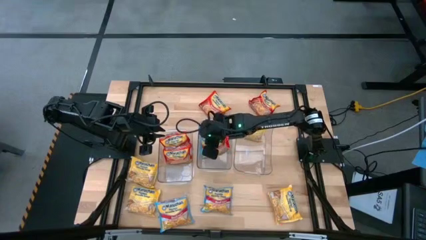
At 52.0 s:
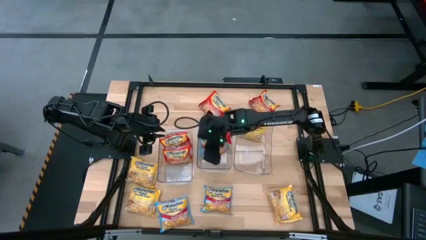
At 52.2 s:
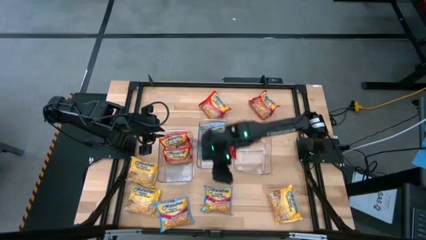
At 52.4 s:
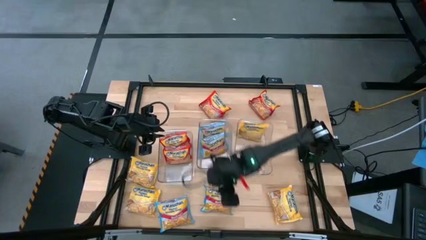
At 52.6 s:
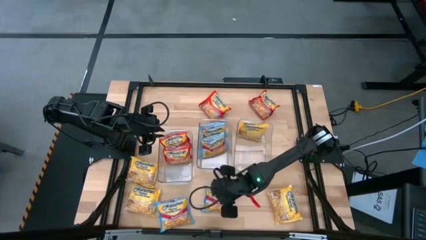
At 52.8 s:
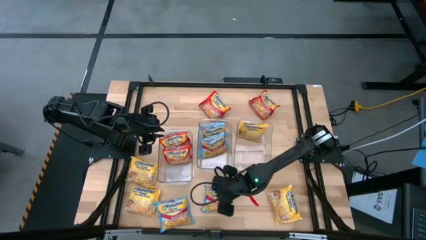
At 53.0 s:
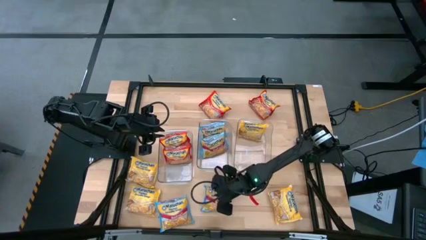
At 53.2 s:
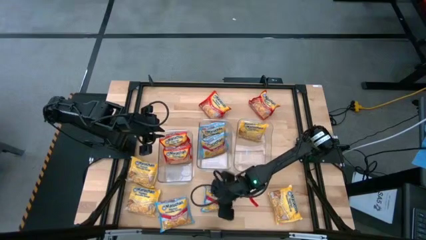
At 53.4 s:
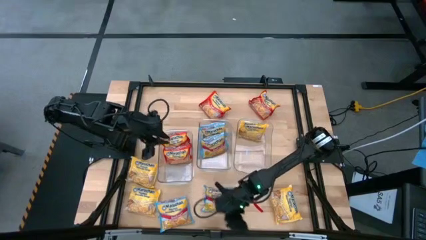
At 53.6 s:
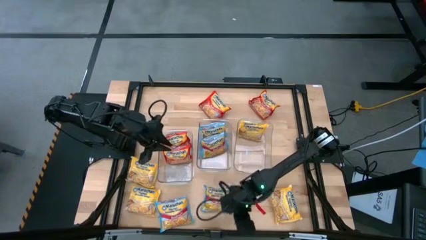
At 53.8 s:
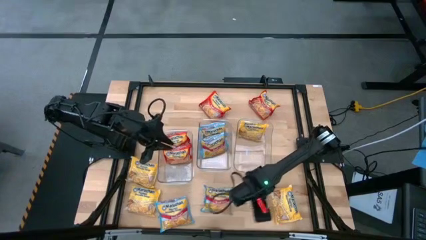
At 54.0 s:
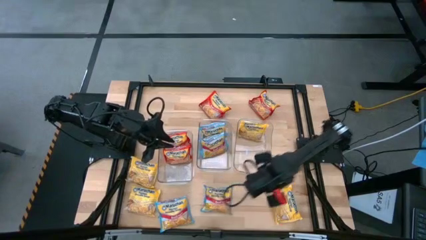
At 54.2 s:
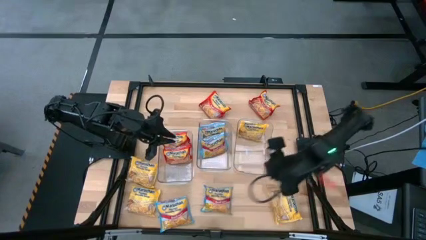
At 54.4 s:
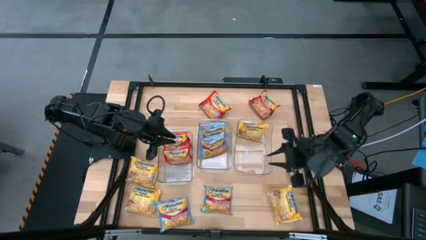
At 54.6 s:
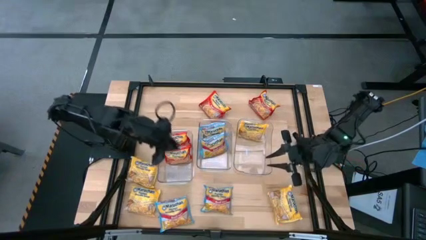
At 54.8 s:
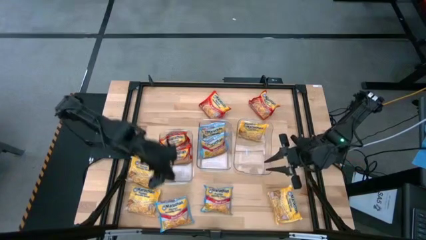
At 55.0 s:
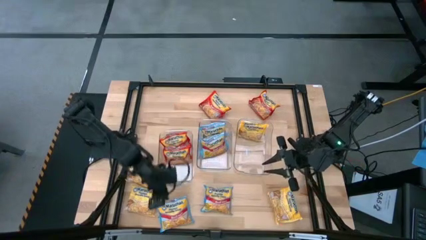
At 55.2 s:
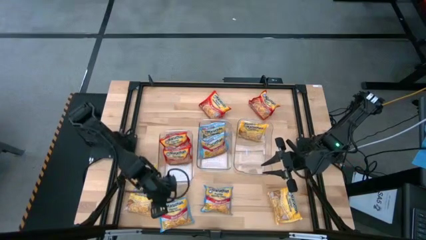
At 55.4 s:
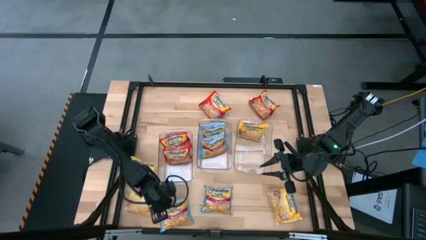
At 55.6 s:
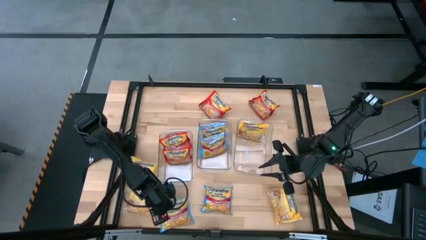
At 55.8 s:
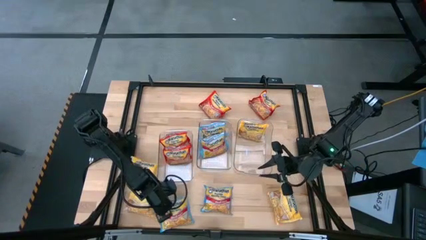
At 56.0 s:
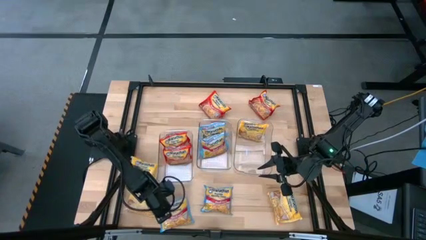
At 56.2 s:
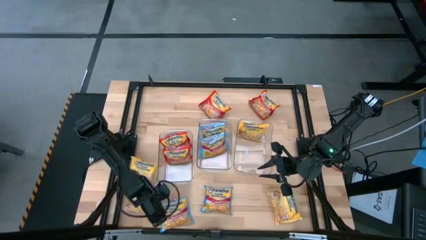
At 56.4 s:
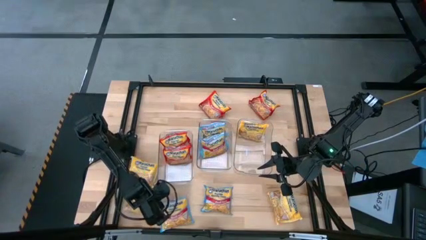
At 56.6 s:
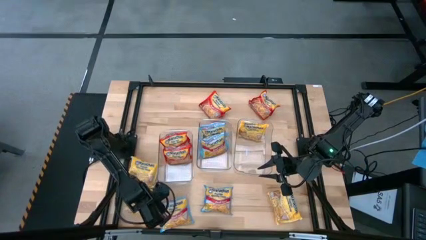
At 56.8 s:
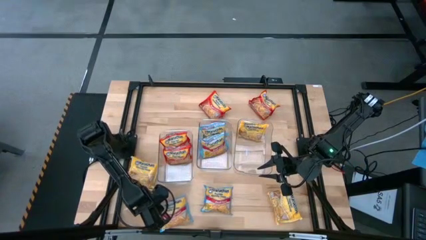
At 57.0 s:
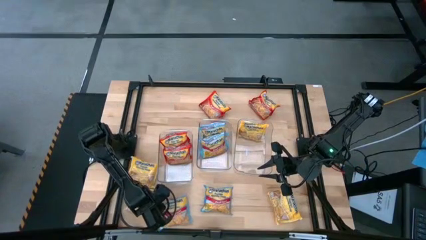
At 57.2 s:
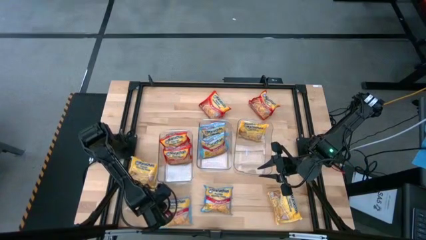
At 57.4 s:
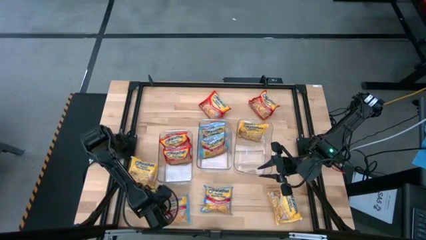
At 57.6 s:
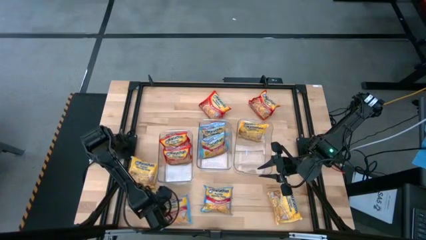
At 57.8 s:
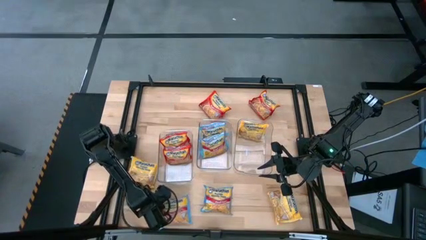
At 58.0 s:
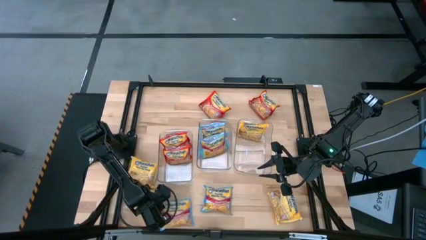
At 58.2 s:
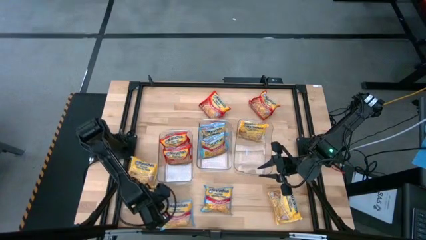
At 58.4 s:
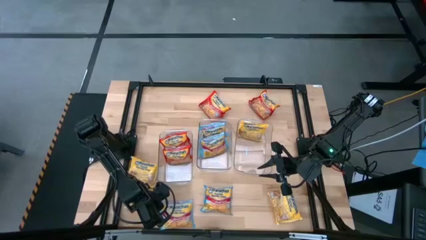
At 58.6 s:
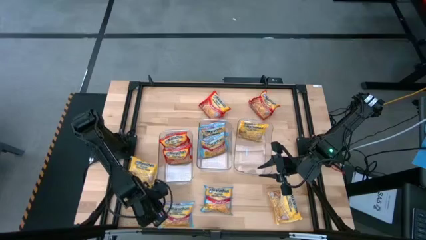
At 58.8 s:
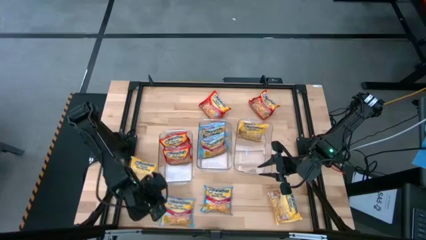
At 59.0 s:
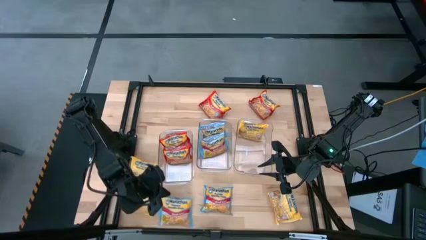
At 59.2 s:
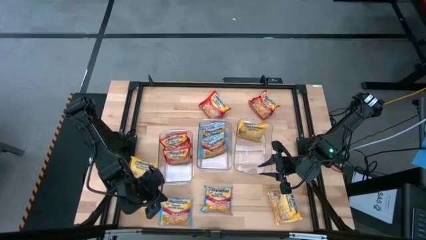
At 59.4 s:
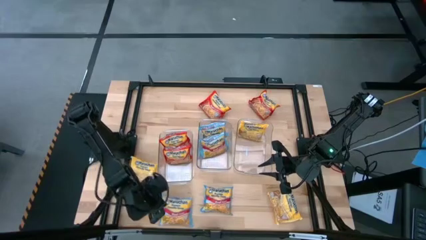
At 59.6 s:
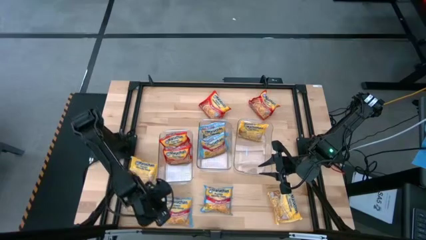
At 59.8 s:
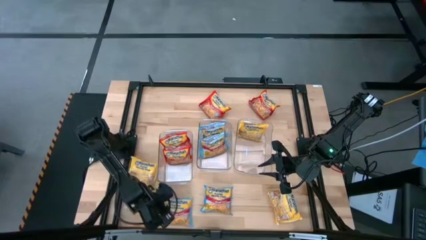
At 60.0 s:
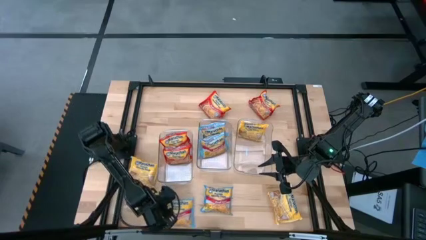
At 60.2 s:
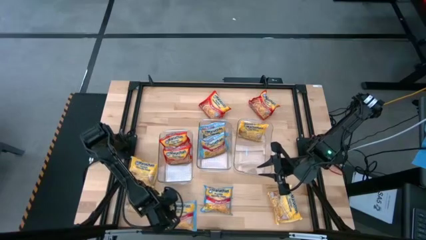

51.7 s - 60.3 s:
Task: Sort Maruchan noodles
Put the blue noodle pack into the middle transparent bin

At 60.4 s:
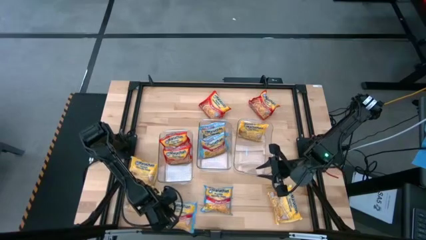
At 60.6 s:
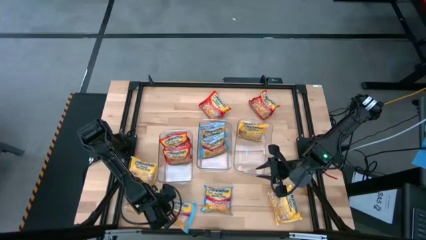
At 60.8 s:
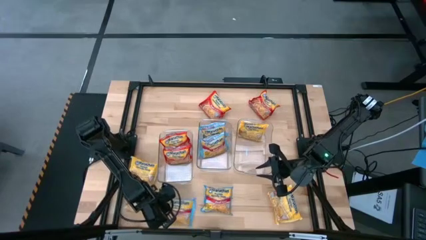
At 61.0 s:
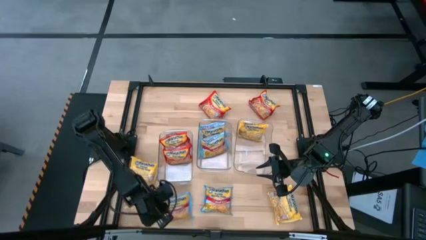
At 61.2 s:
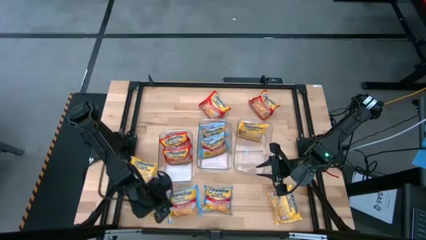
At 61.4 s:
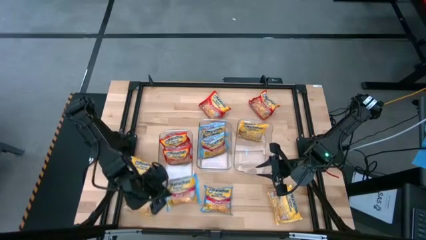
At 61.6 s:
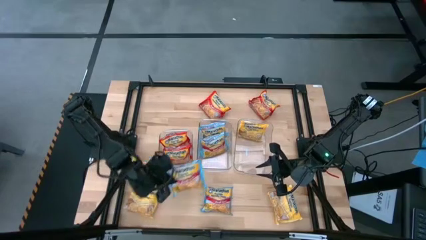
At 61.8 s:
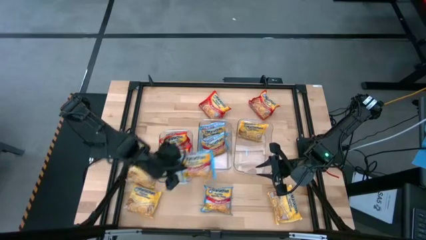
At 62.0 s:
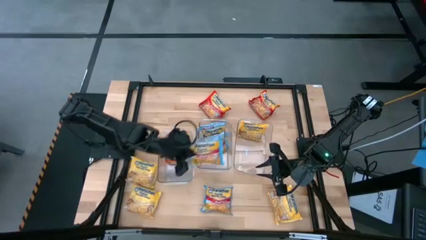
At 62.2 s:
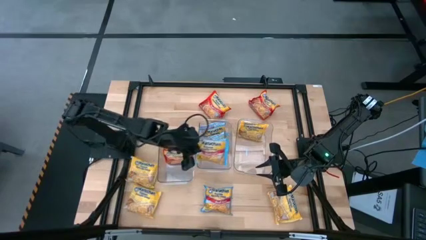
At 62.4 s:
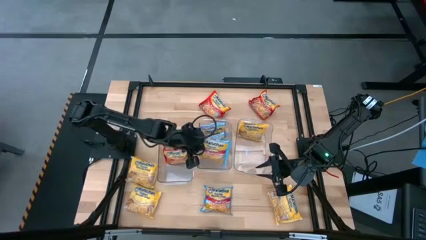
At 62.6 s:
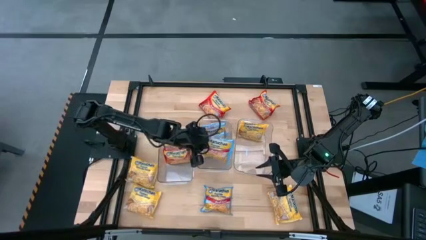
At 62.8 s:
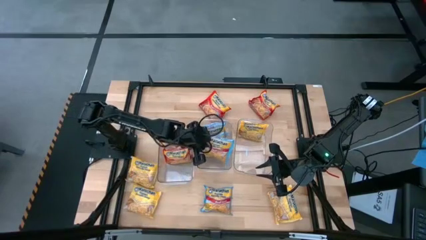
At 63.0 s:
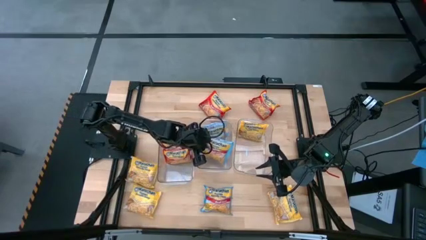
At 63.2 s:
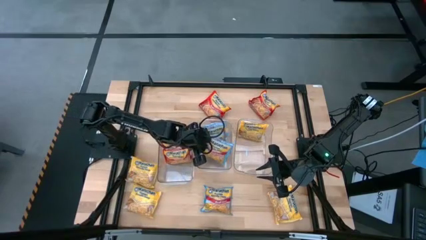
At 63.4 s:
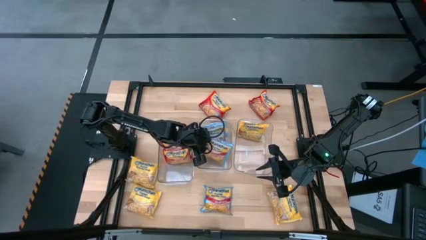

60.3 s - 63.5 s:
Put the blue noodle pack into the middle transparent bin

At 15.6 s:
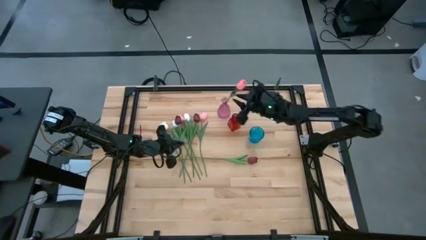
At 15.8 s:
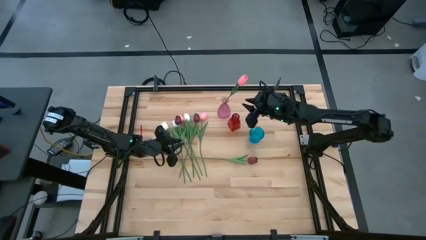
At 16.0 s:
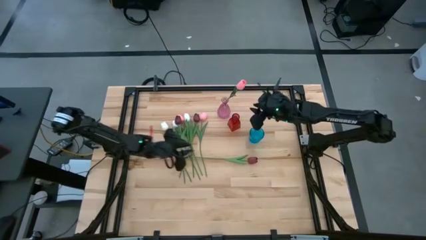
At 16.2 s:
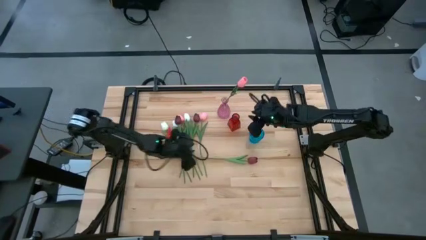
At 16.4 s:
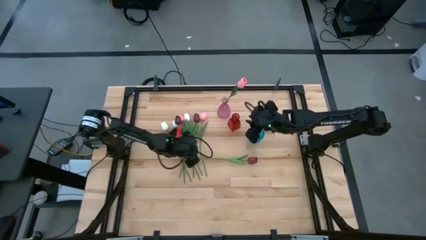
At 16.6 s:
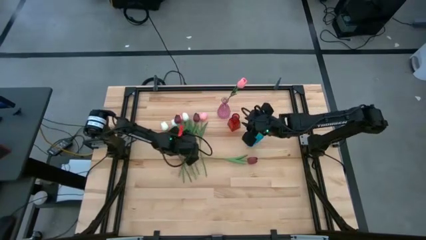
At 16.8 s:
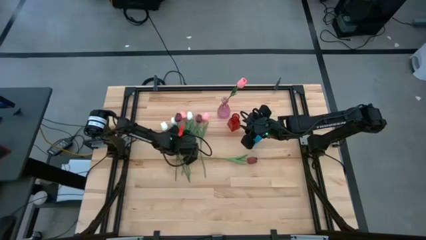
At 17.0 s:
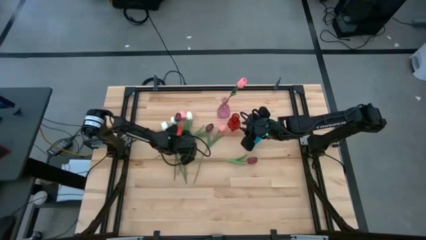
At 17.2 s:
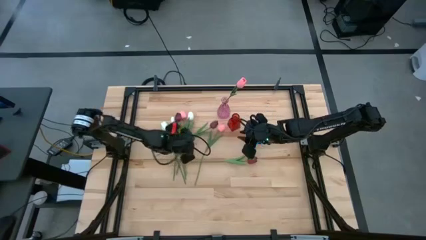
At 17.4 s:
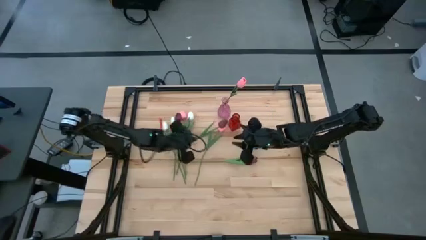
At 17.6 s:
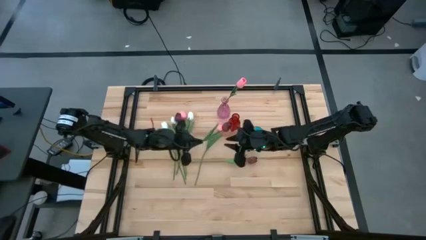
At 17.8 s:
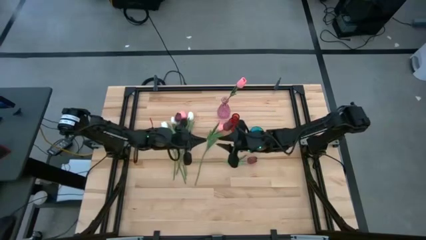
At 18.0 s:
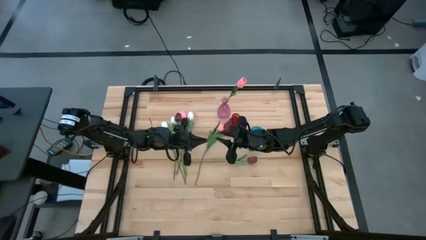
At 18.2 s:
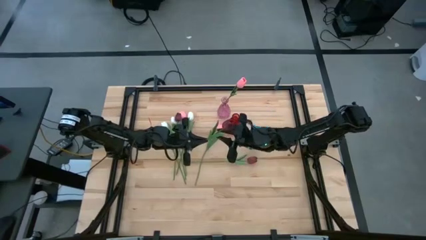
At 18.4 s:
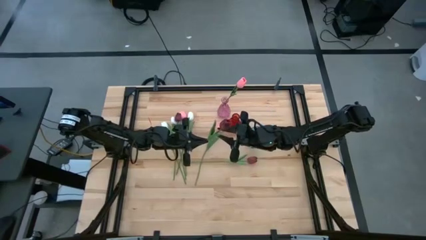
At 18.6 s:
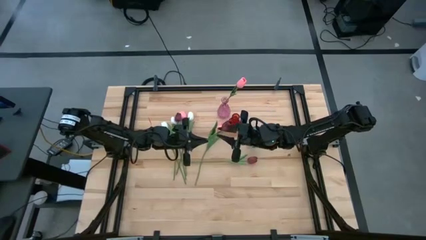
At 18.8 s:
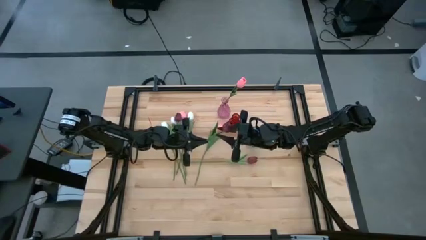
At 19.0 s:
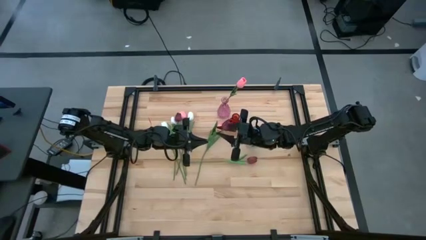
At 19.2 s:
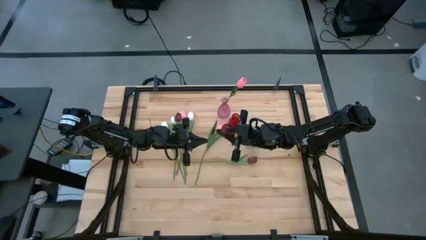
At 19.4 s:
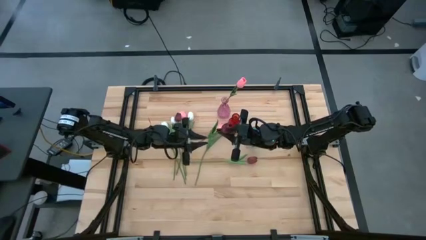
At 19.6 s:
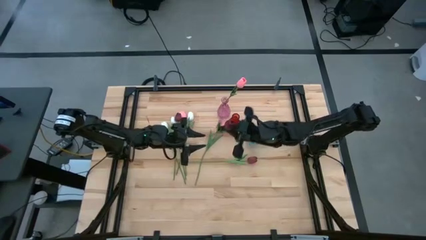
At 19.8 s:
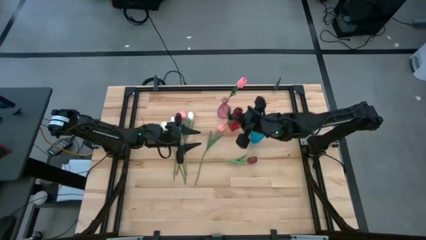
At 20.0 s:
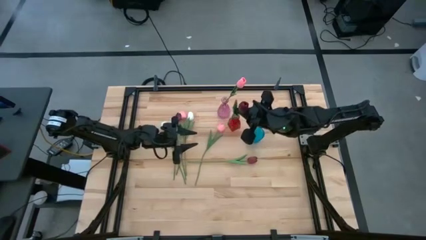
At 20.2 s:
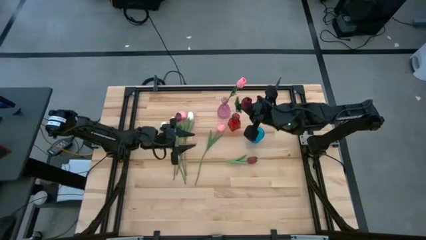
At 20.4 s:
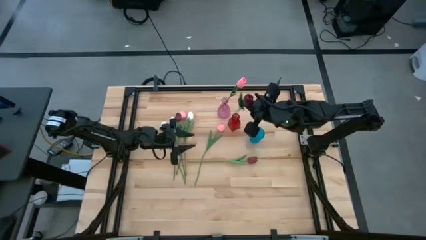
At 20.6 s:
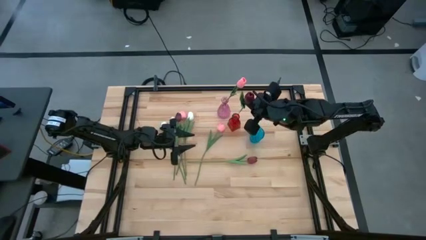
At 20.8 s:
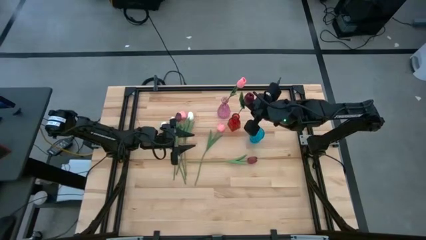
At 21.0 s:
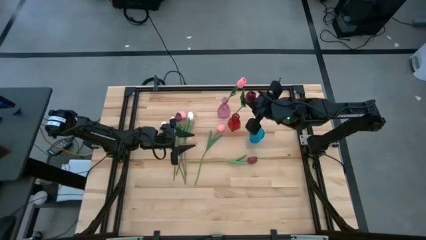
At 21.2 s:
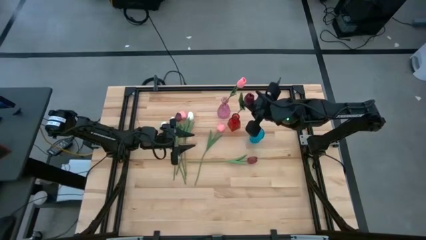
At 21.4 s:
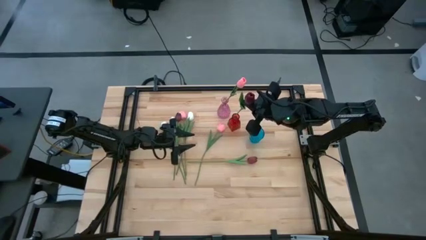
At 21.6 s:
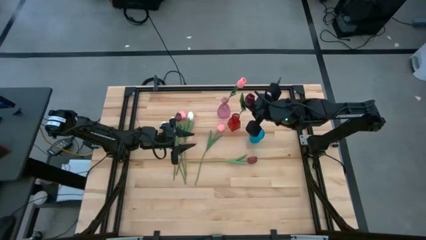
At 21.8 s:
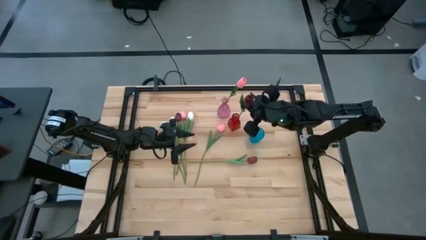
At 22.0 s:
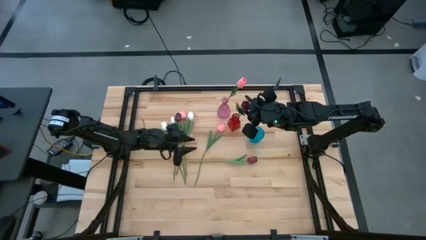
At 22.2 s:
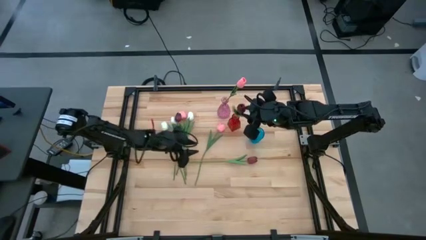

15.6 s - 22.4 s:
Task: Sort flowers into vase by color
Put the red flower into the red vase
